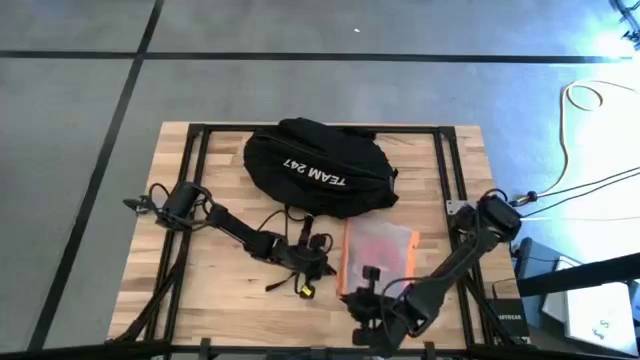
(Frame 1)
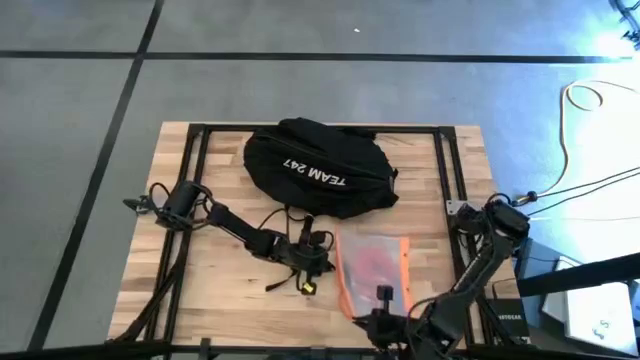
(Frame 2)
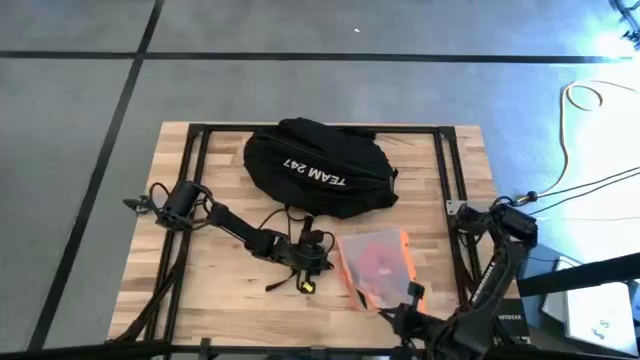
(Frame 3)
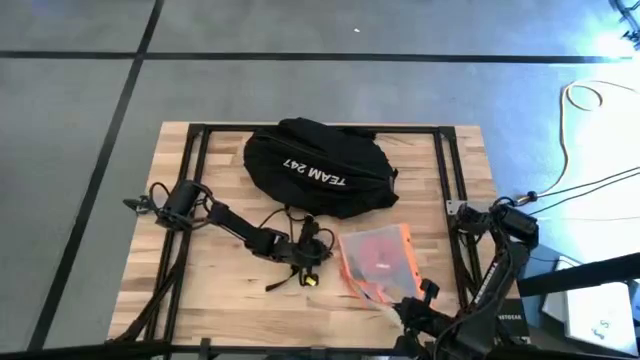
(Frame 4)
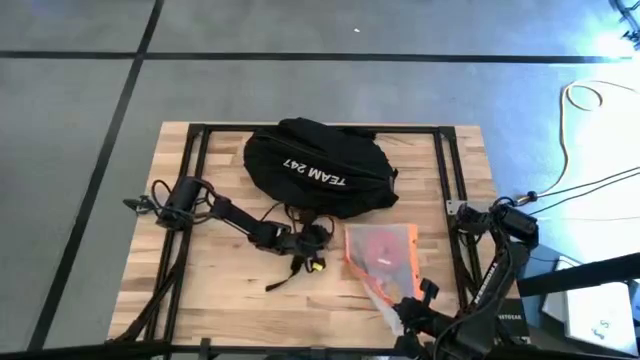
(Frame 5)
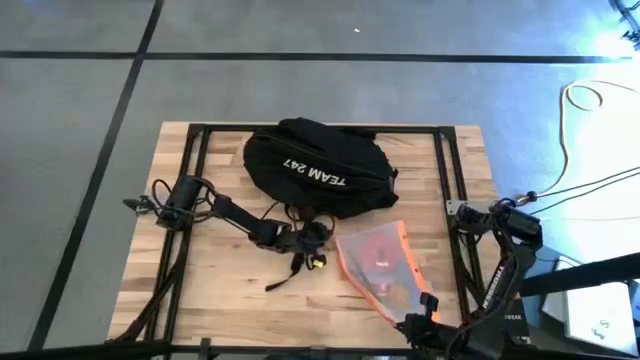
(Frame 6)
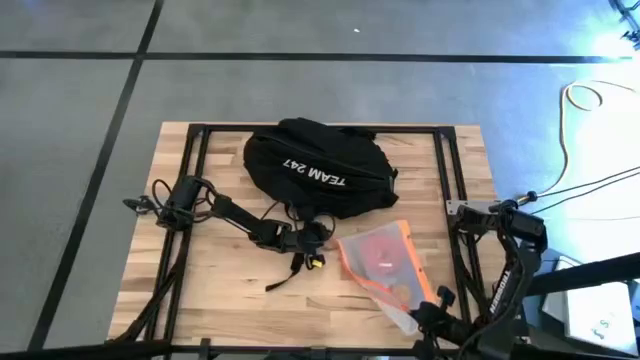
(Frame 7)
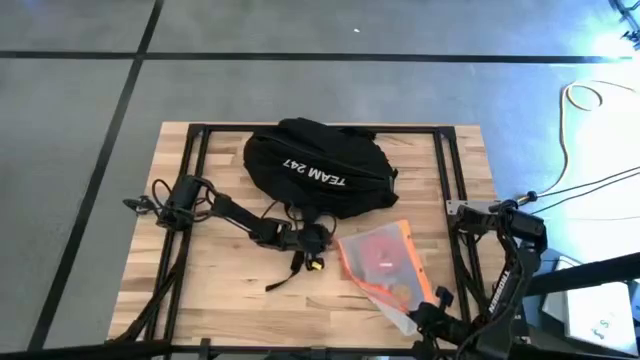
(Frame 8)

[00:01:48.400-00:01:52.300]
Task: Unpack backpack
Open the transparent white zip bag

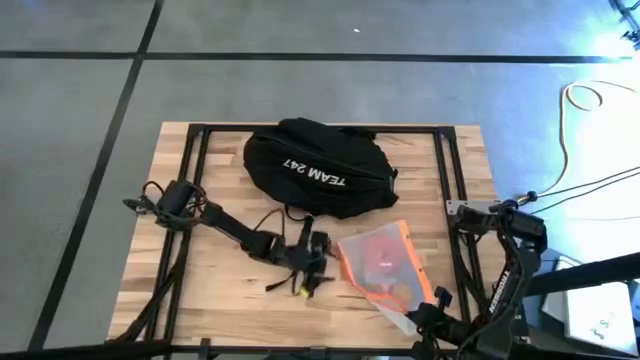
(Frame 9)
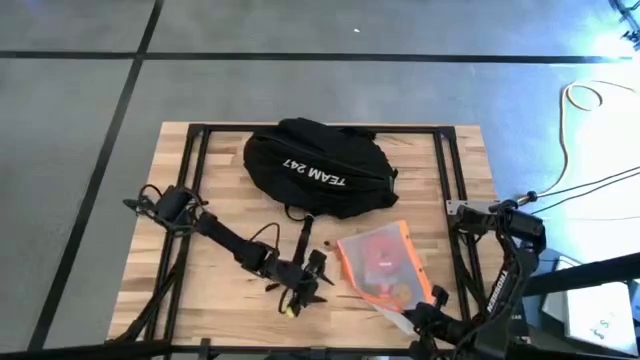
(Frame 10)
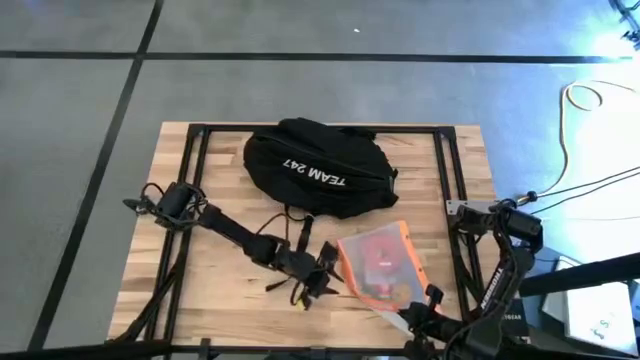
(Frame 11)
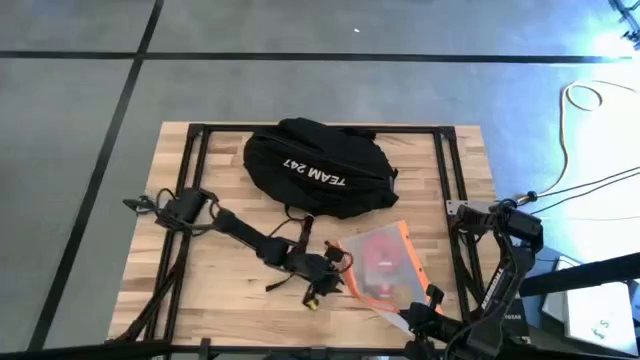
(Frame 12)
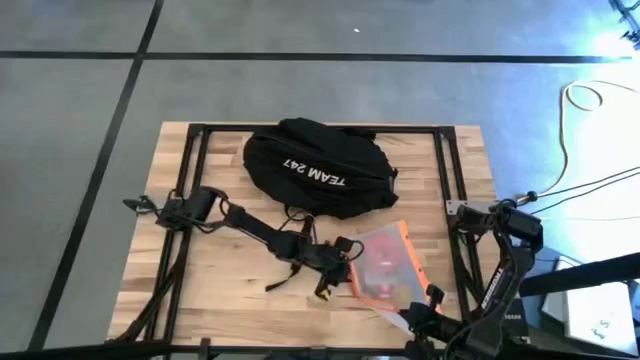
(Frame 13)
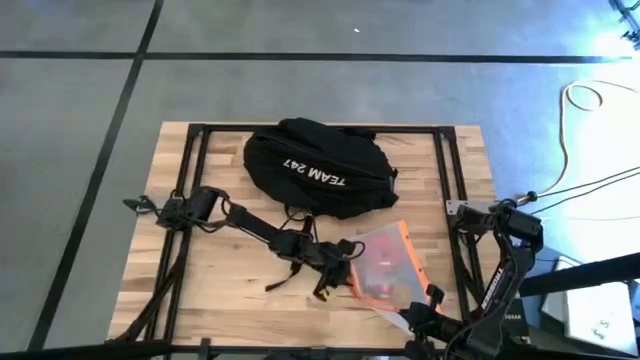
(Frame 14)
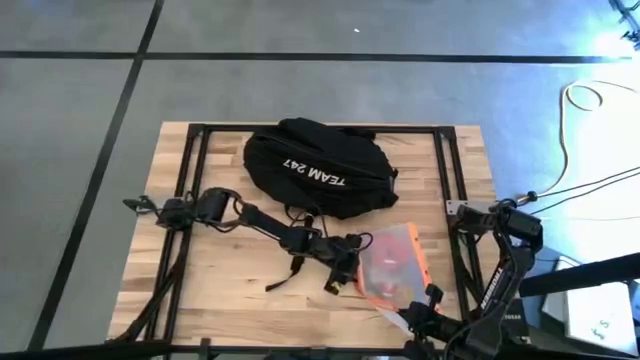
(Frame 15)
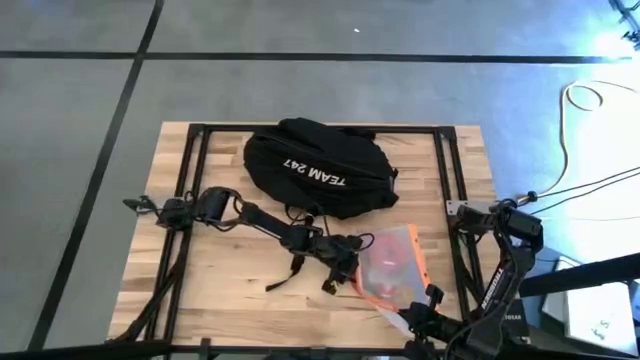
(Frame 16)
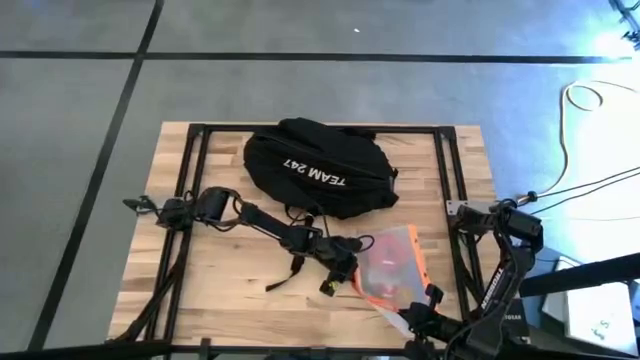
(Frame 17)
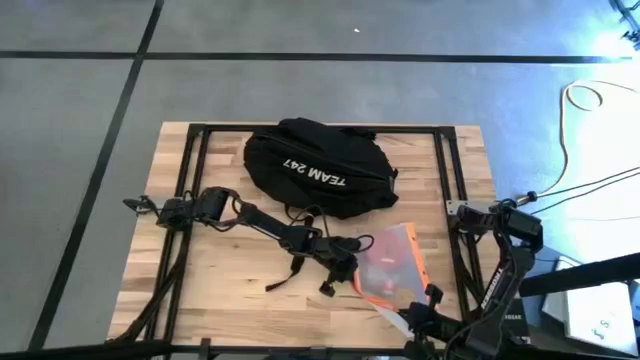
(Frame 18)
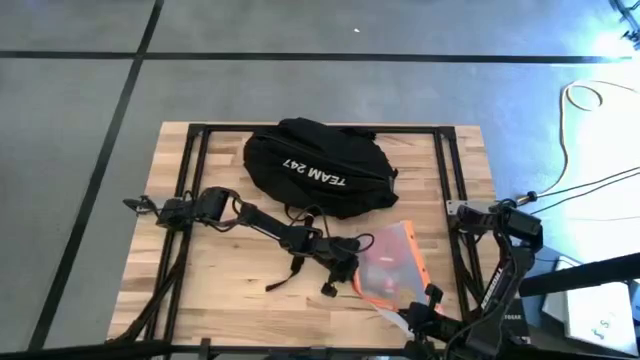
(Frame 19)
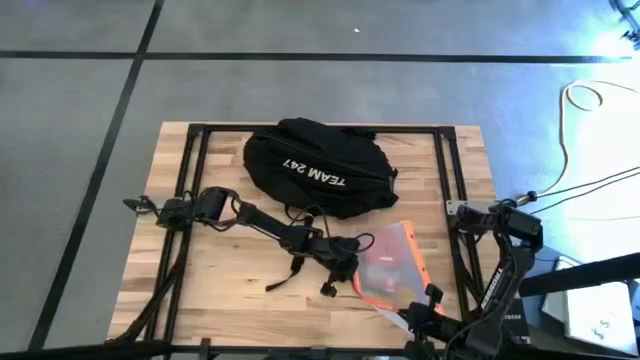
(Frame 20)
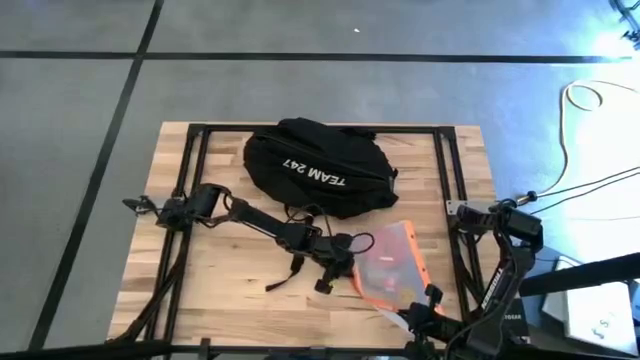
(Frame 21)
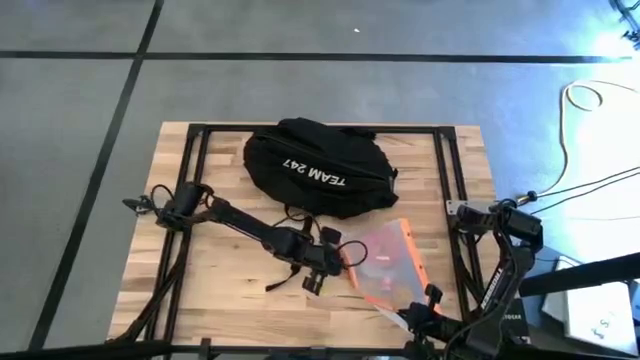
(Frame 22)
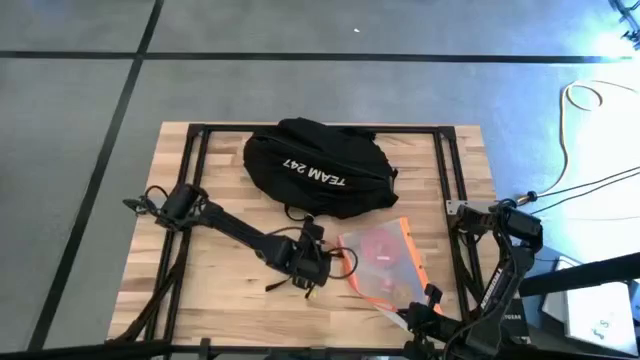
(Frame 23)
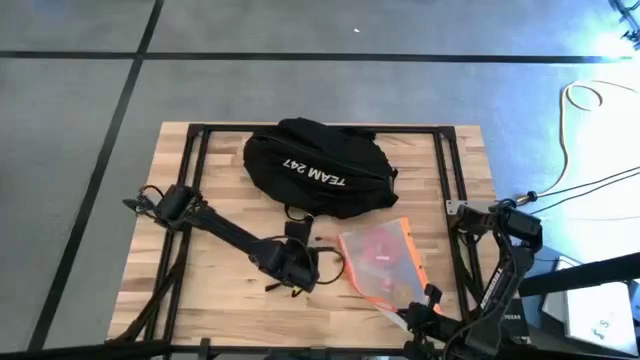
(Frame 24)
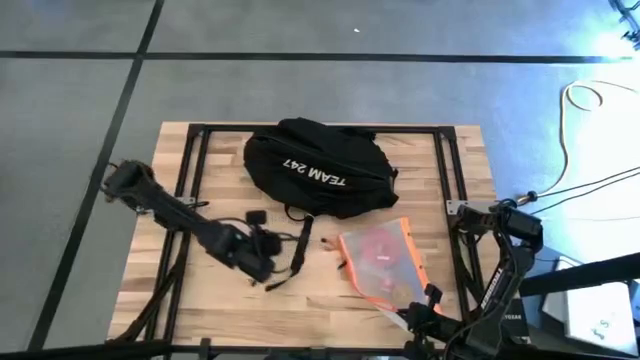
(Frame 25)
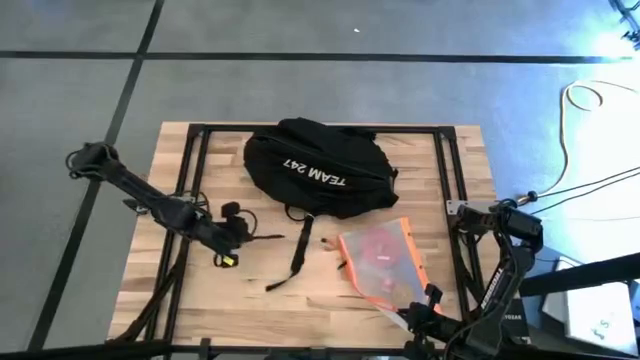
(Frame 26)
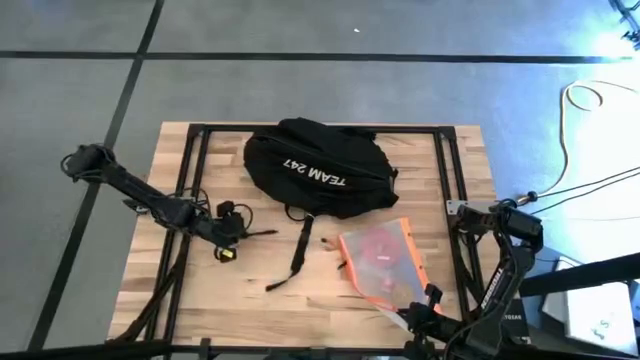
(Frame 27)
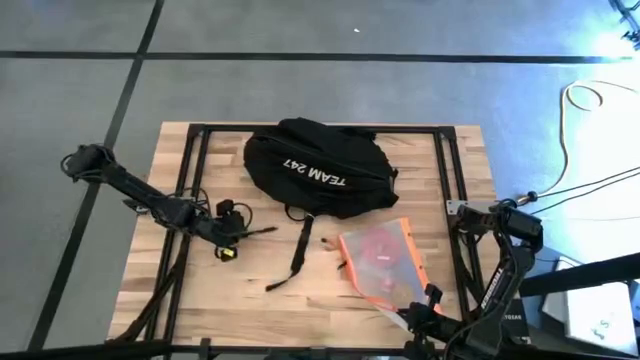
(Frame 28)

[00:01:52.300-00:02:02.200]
Remove the right black pen from the transparent white zip bag

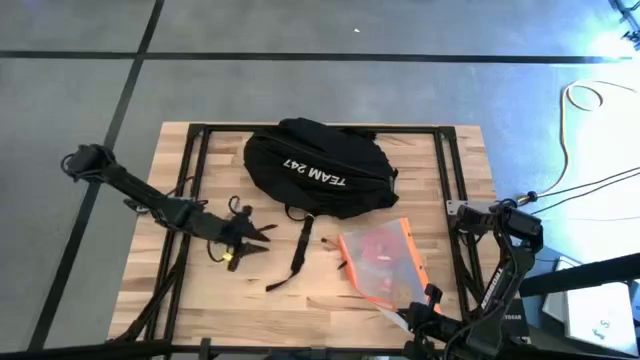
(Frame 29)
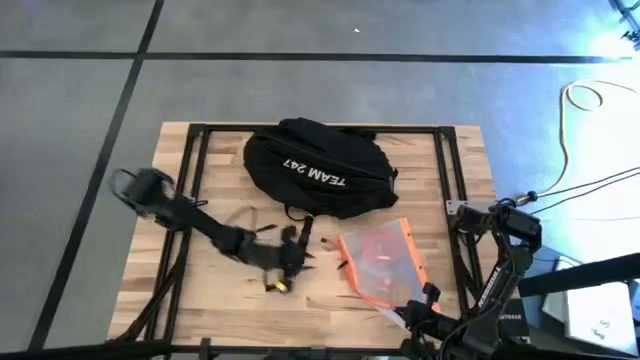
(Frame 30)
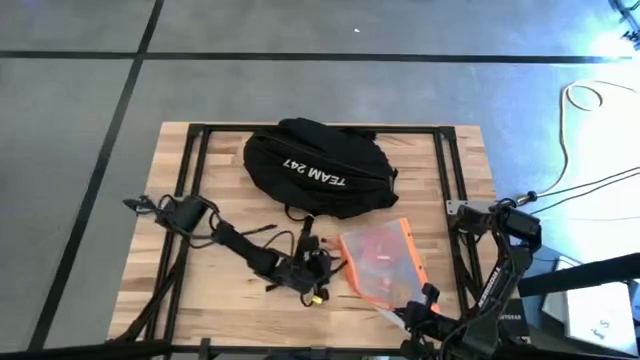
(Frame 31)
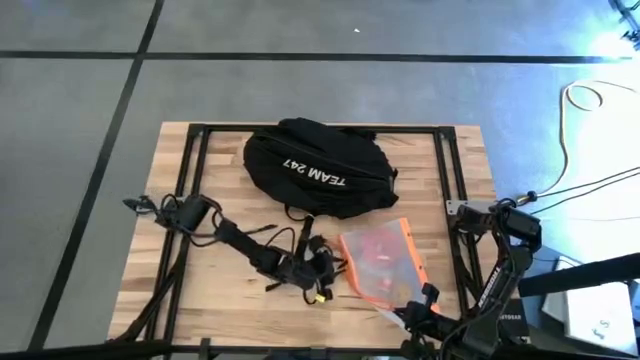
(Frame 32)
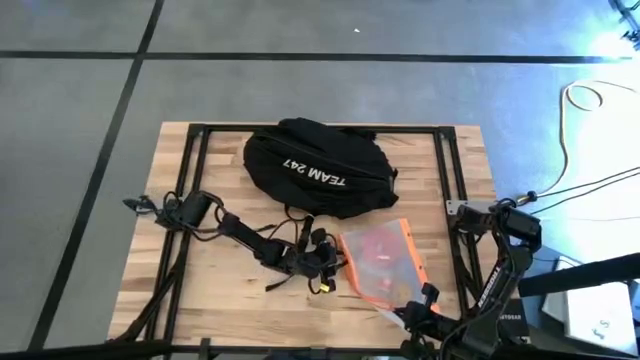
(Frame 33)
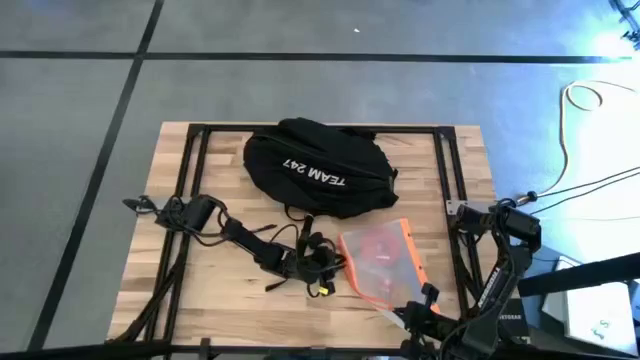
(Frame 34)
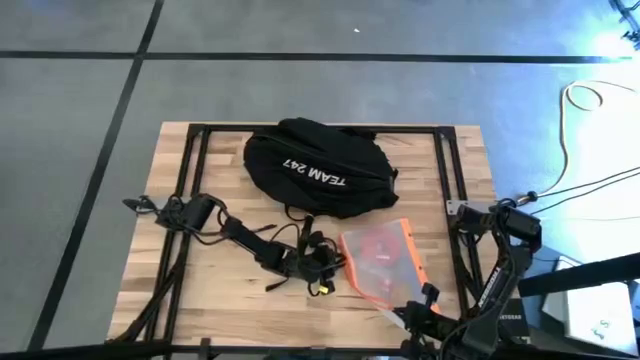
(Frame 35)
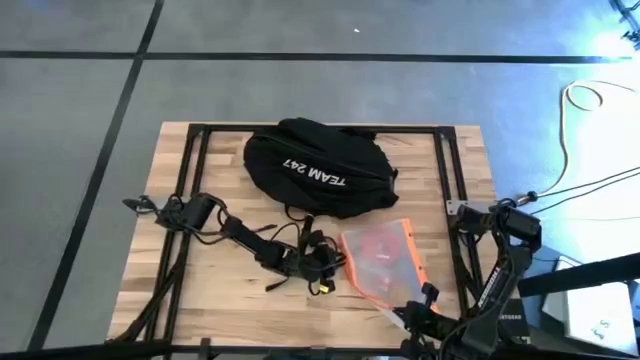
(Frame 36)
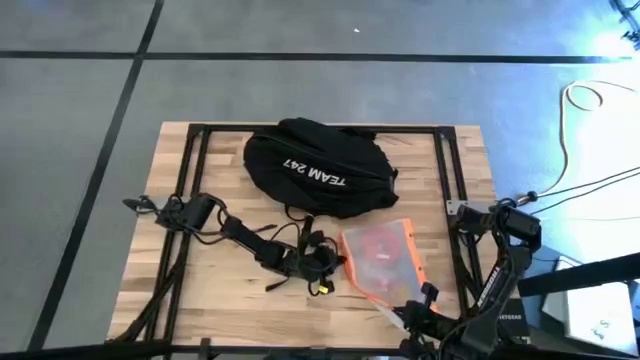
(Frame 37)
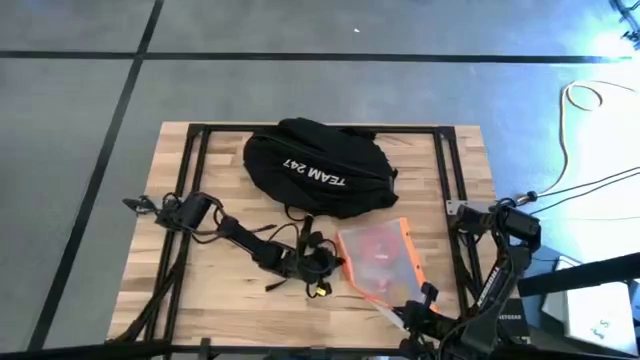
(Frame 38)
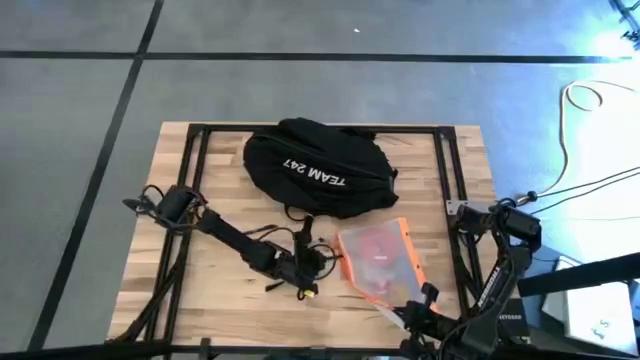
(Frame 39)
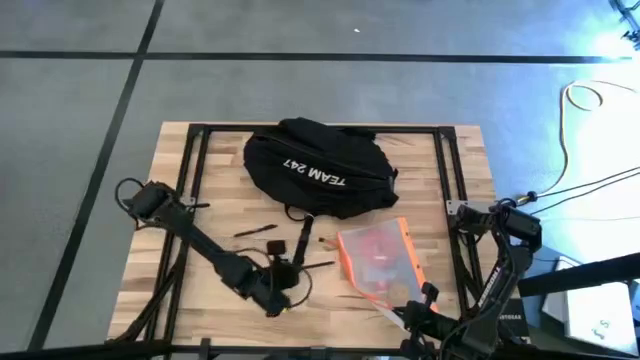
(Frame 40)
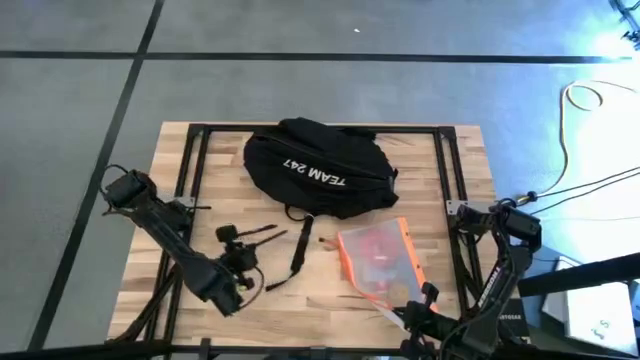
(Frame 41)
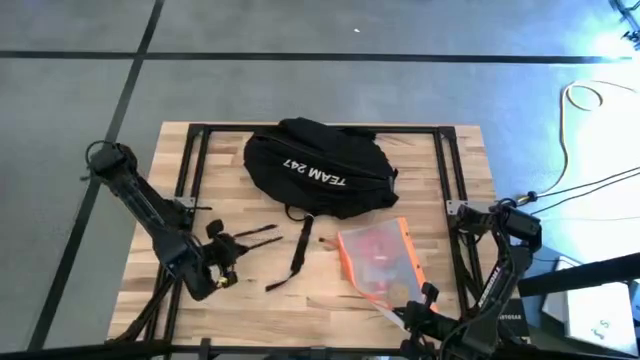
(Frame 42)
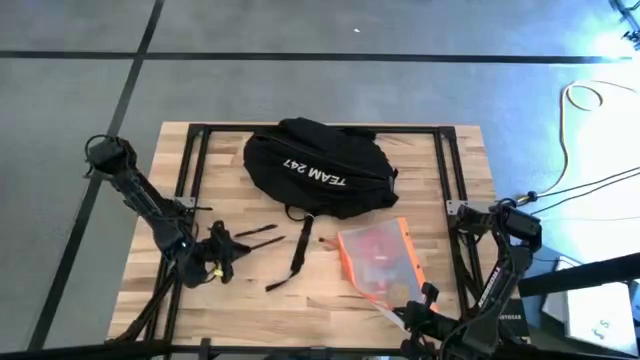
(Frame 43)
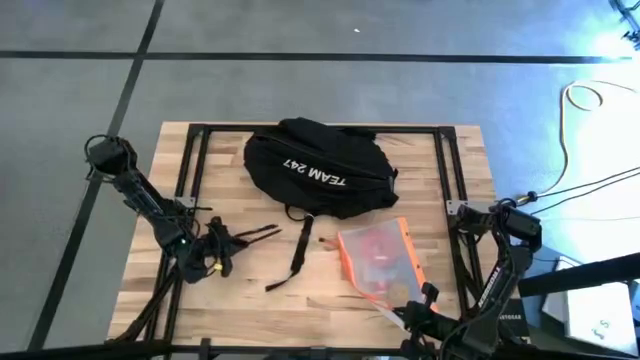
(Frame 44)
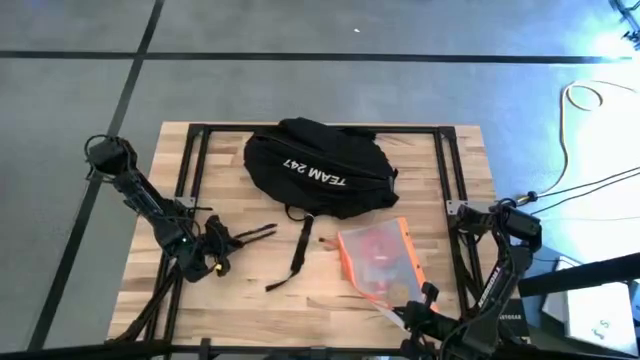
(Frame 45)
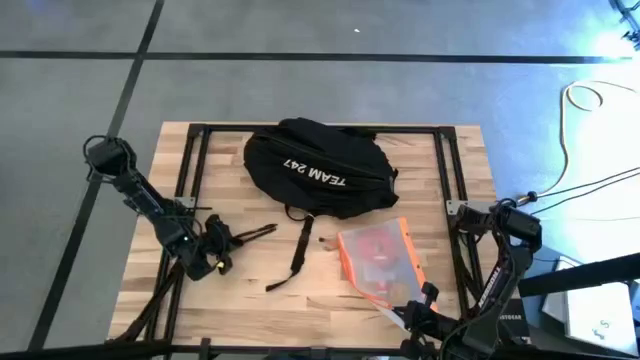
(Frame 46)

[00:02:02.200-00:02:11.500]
Remove the black pen from the transparent white zip bag
